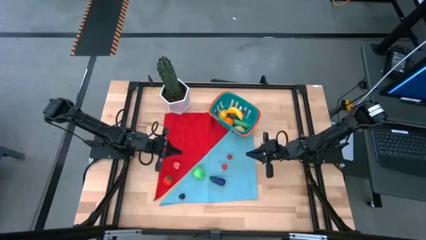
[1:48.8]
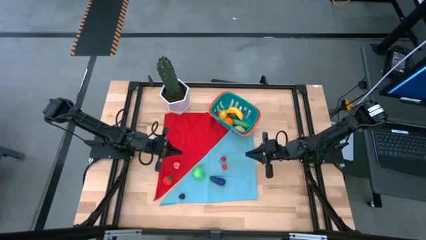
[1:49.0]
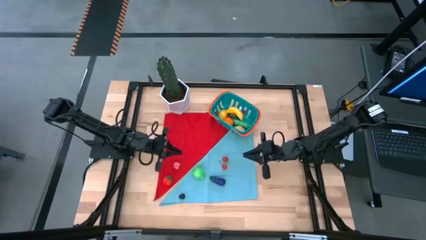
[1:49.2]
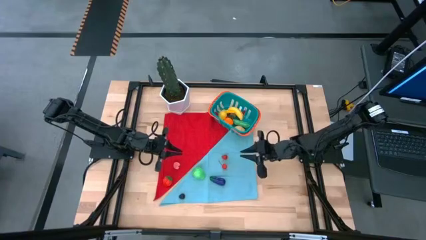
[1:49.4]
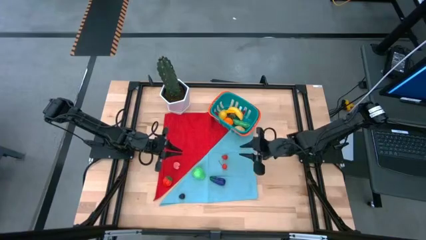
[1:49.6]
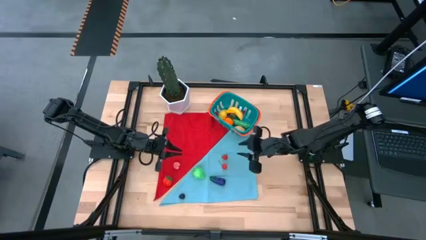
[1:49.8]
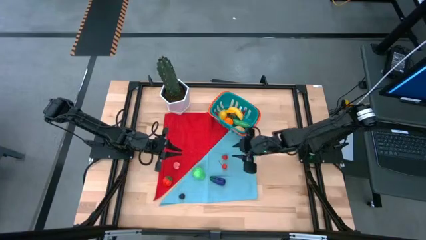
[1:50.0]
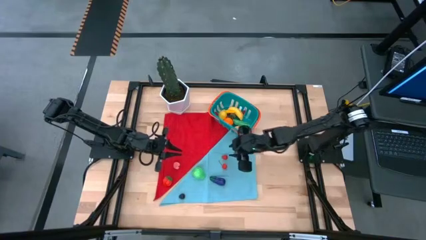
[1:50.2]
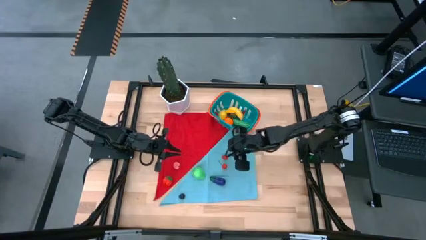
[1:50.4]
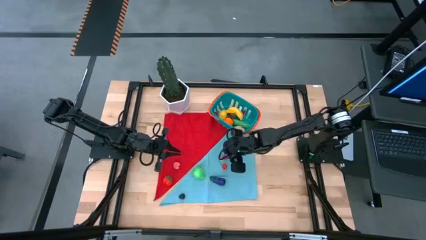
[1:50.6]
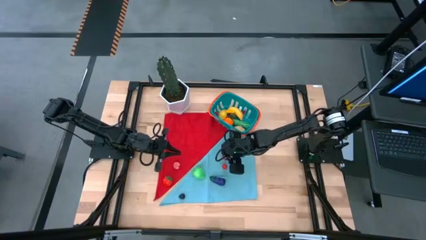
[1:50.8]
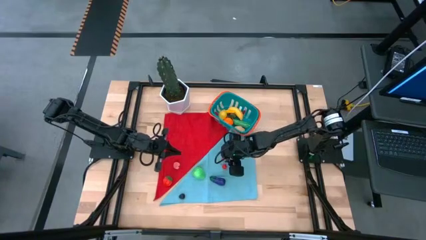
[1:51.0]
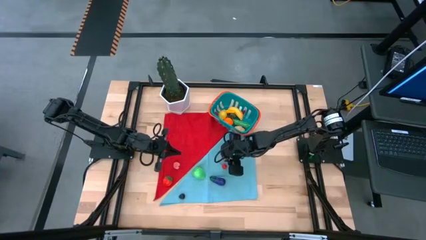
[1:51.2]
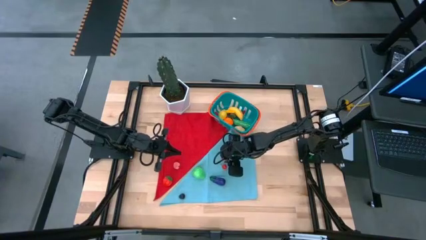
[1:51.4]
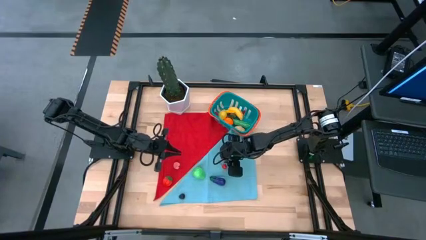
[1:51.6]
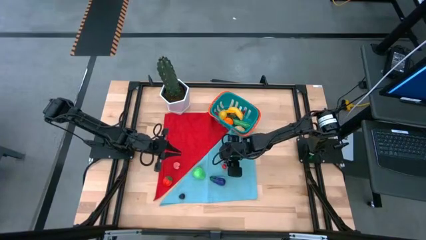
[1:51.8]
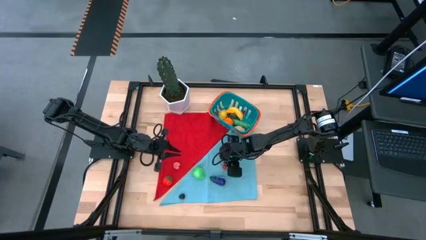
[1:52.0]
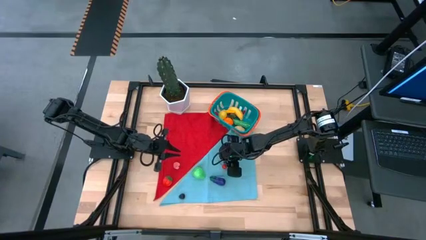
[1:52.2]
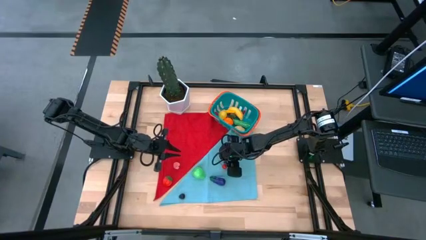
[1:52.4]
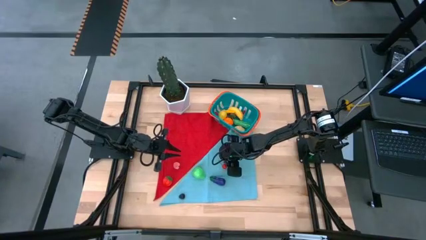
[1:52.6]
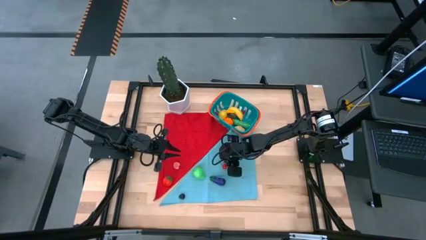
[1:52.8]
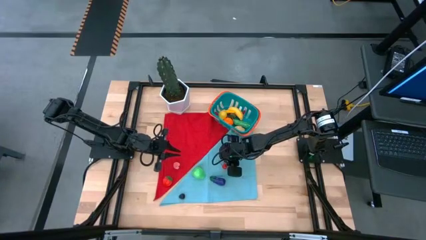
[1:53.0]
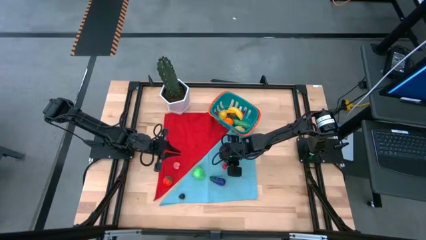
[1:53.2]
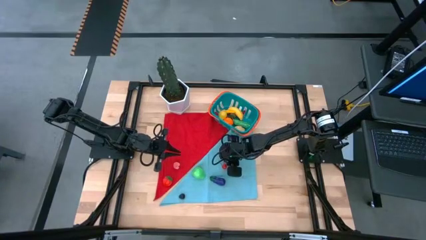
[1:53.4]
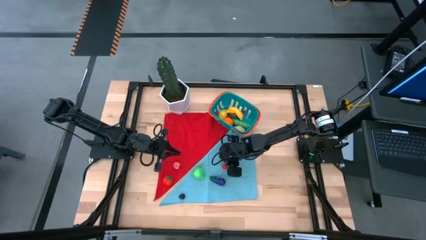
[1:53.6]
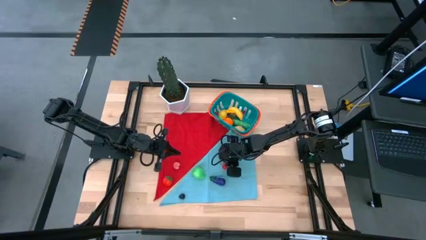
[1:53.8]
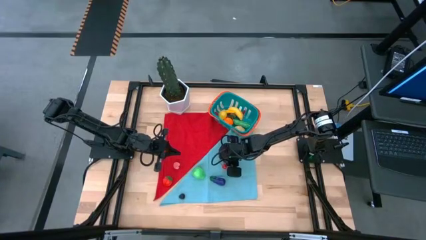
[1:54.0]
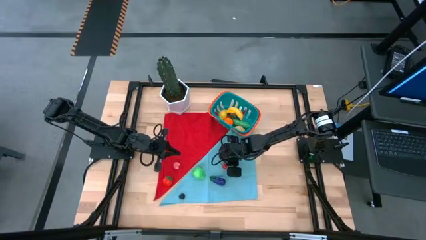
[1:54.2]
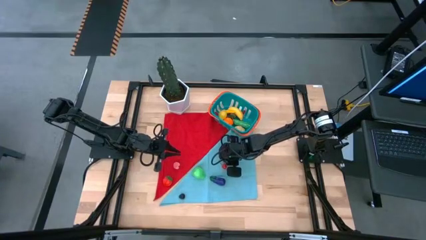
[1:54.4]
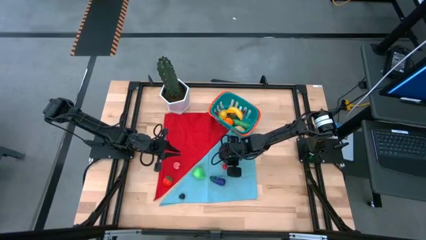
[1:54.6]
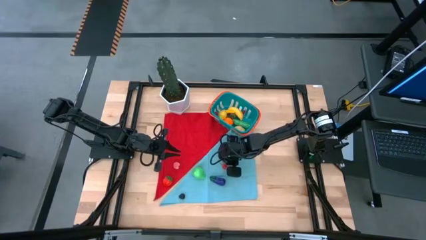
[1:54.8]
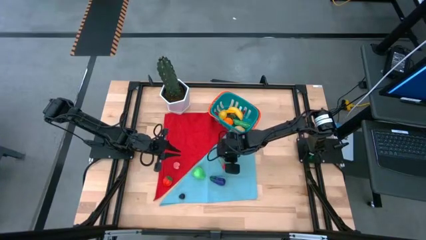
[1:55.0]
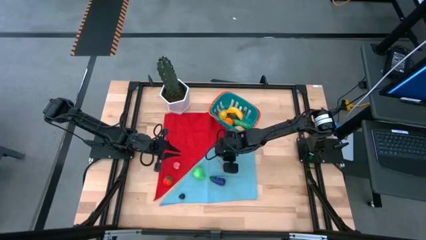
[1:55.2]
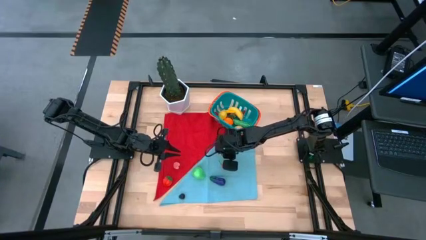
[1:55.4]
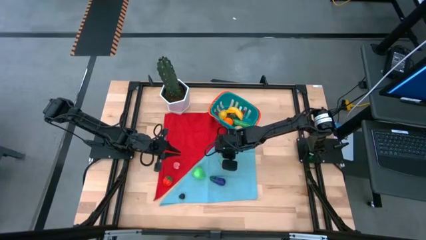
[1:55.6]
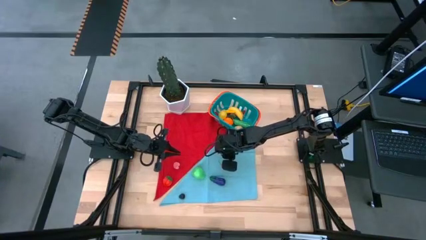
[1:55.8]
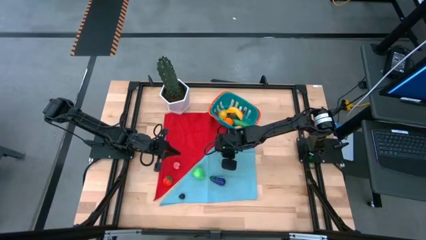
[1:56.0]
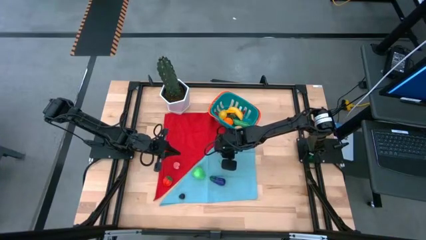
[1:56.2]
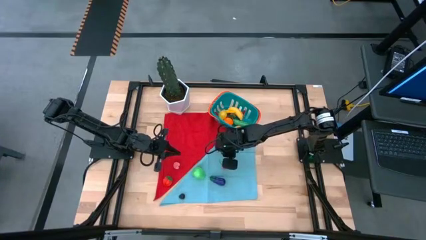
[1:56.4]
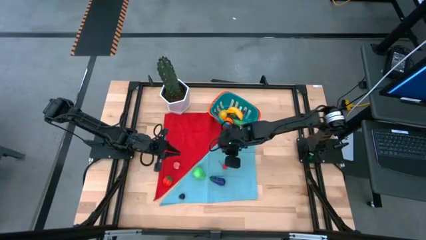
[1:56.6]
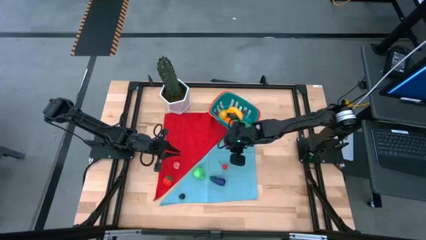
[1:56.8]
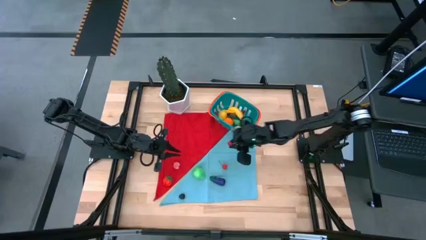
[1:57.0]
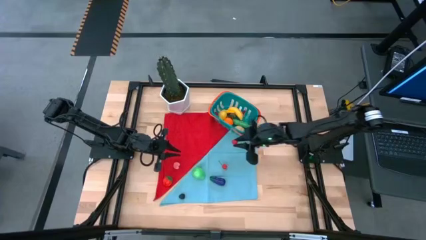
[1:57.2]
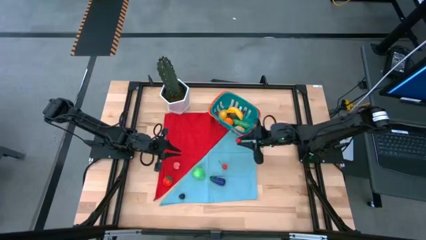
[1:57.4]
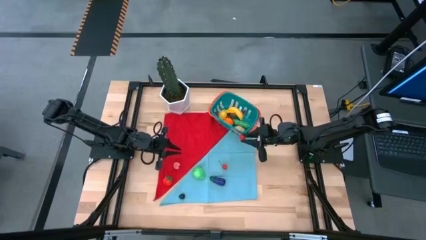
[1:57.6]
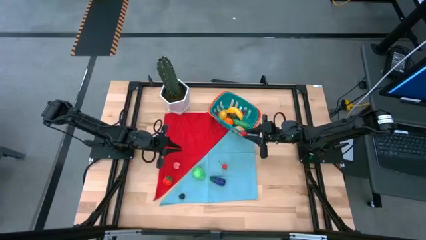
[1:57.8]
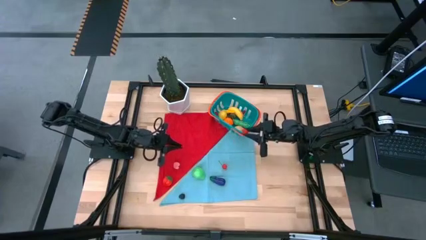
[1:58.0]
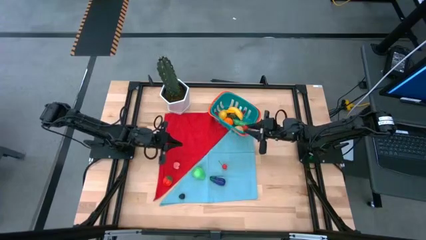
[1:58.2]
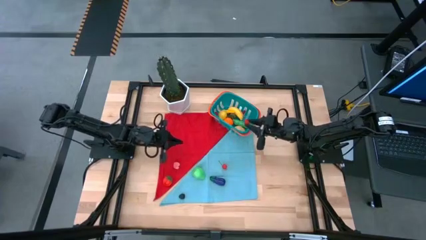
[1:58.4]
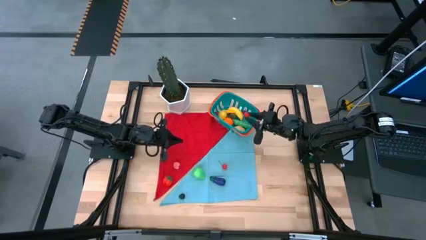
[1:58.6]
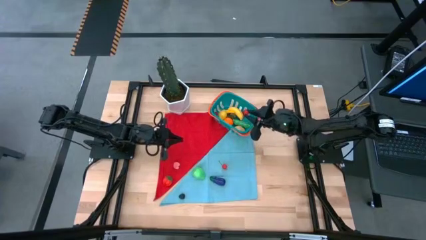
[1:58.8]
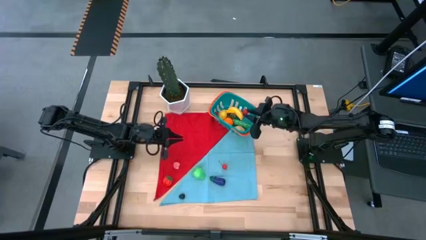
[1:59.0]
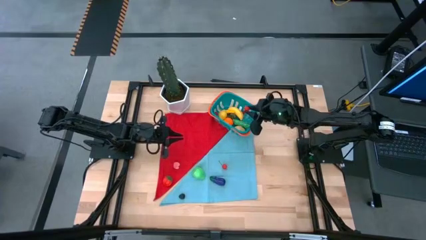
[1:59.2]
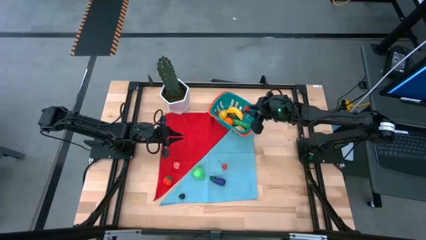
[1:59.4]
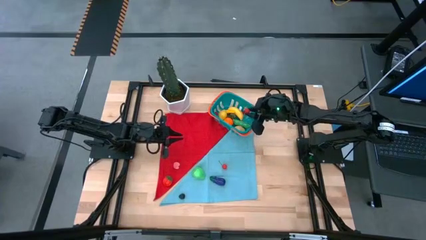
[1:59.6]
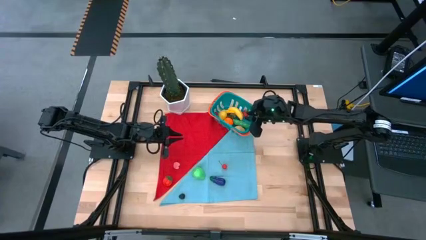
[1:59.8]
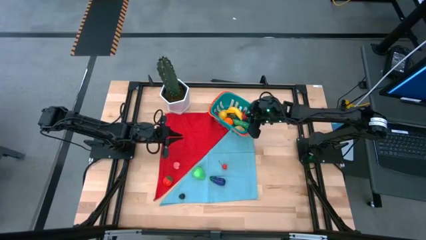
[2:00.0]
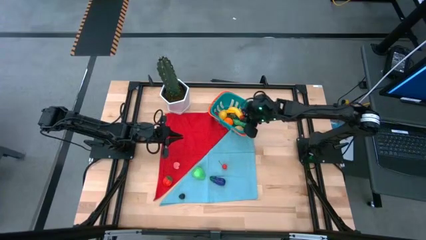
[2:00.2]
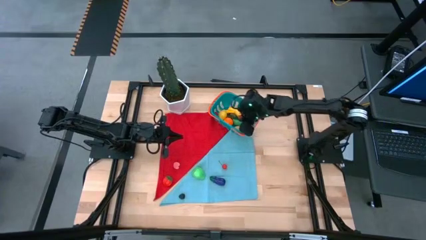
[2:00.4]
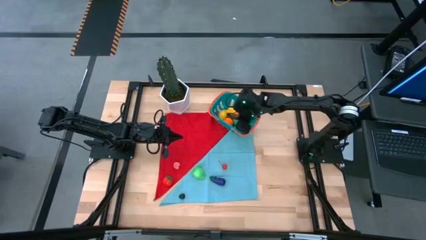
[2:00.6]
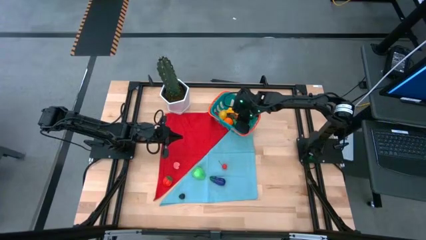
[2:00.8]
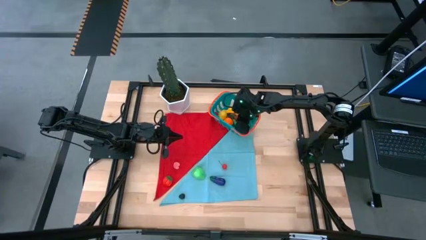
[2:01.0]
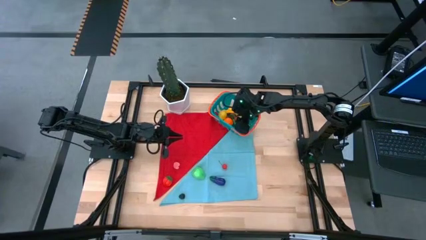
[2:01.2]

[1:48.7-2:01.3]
Task: Pick and placing Produce into tupperware
Put the red raspberry into the blue basket
